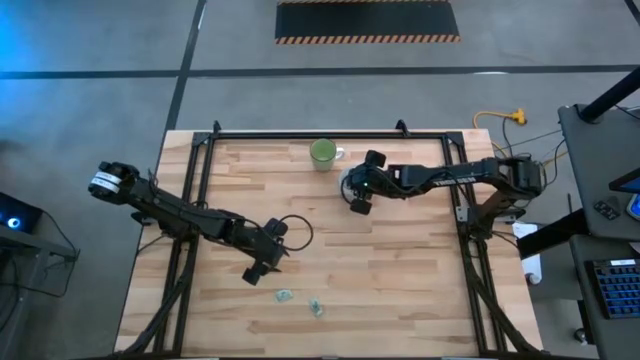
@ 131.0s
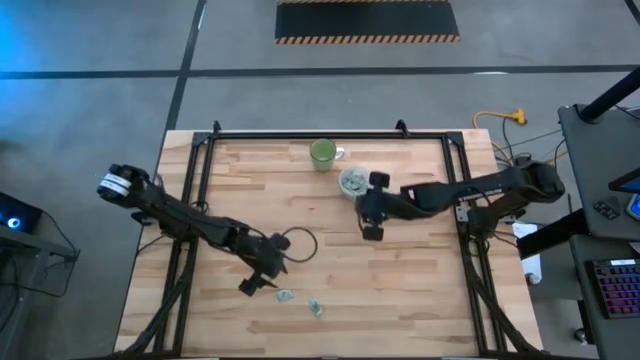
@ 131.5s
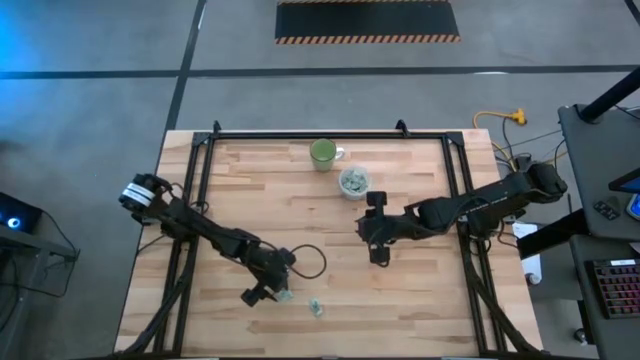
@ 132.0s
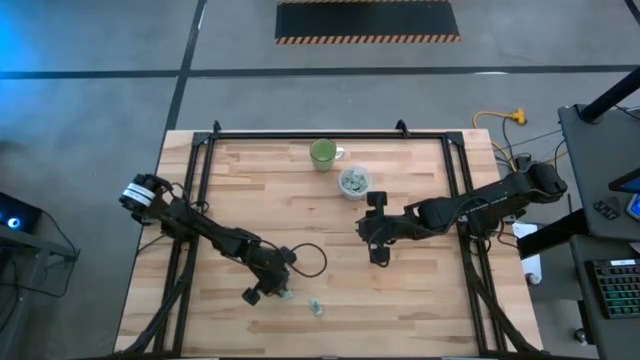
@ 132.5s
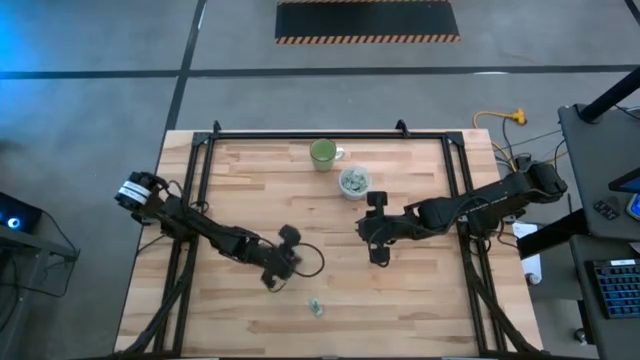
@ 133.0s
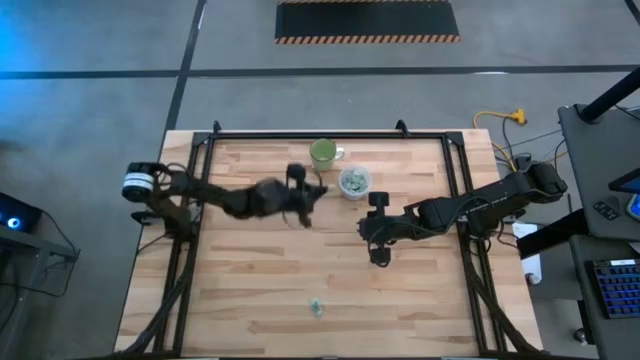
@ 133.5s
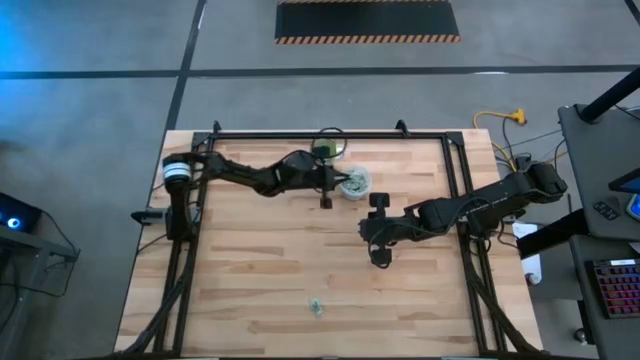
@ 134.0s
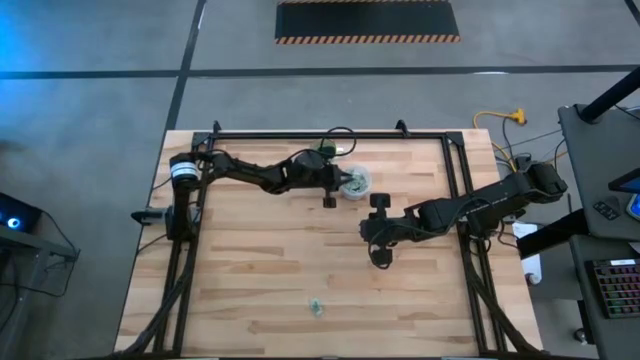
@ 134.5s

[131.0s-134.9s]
Task: Pick and place Stevia / Truvia into bins
Put the stevia packet into the transparent container

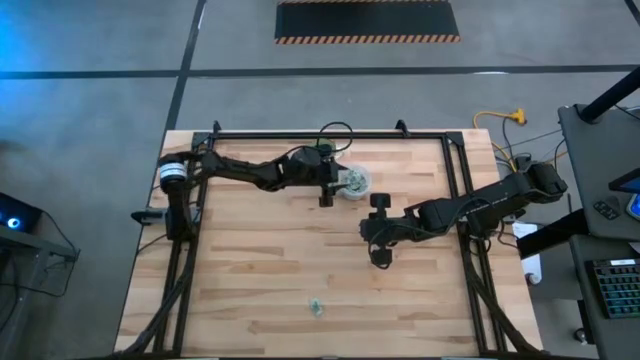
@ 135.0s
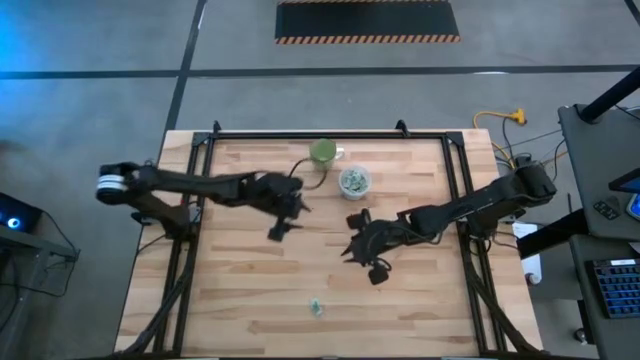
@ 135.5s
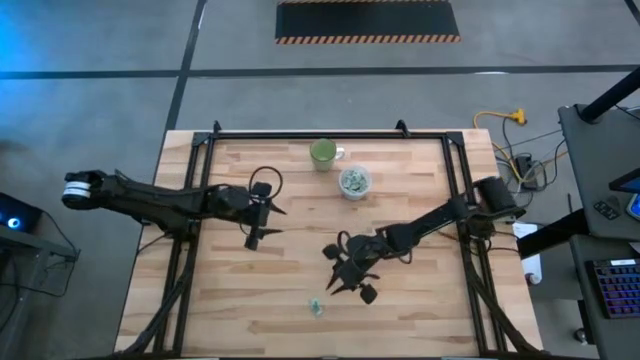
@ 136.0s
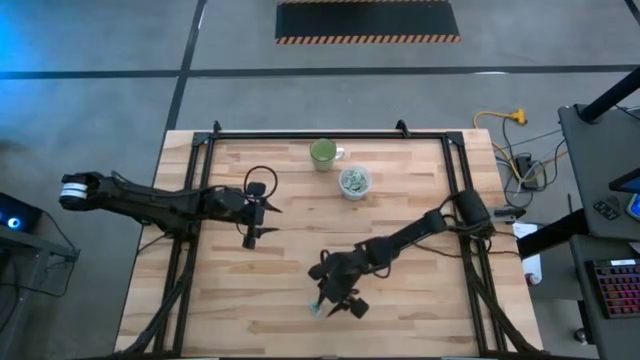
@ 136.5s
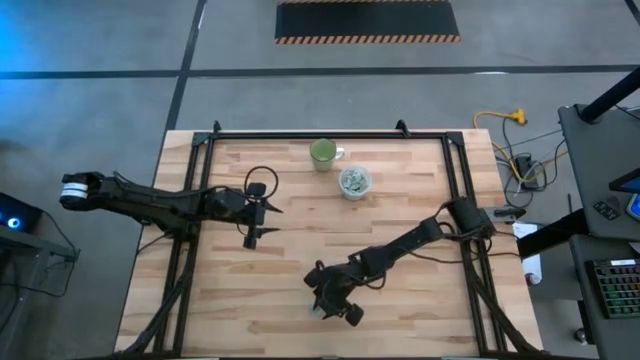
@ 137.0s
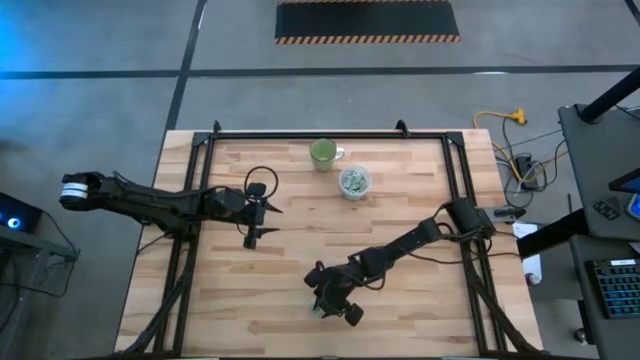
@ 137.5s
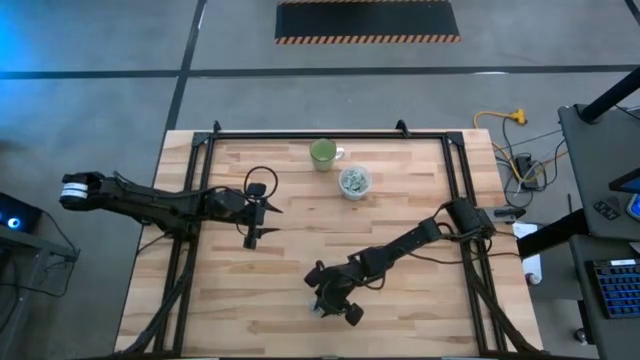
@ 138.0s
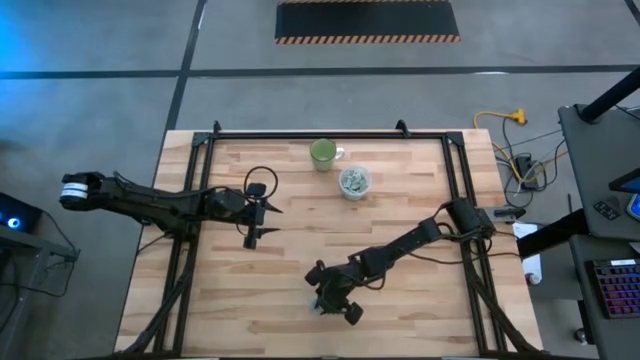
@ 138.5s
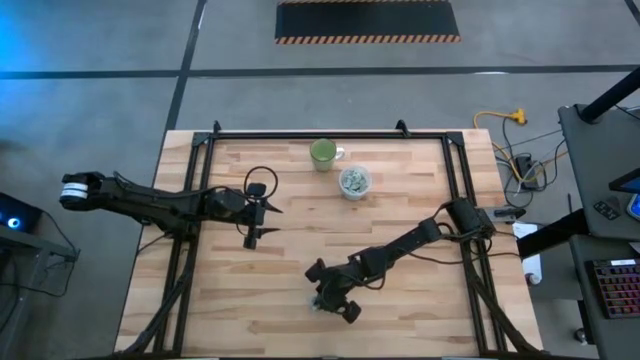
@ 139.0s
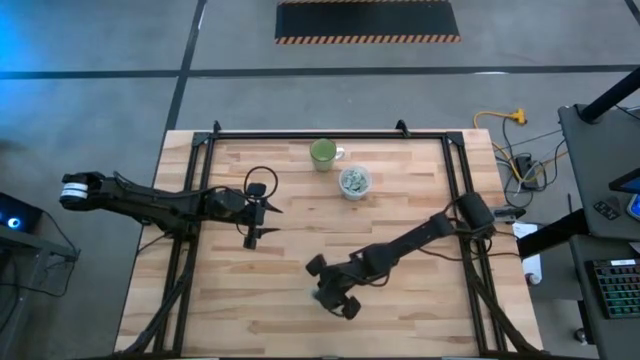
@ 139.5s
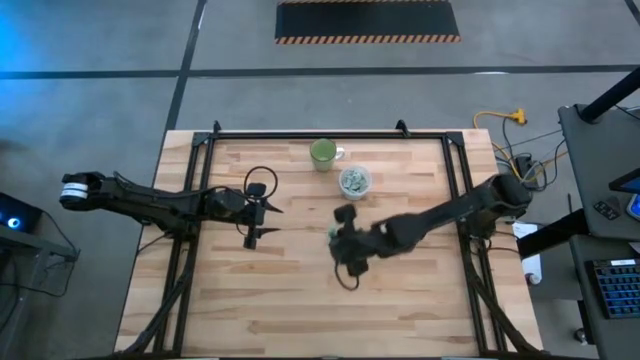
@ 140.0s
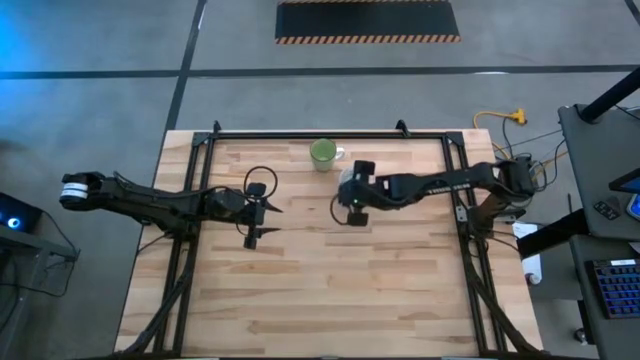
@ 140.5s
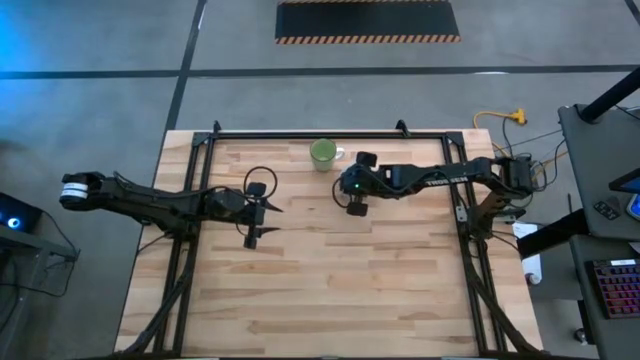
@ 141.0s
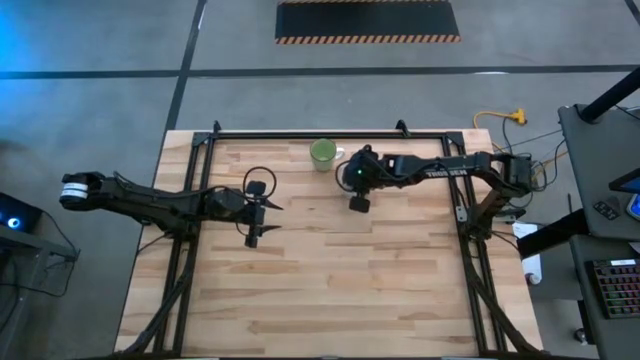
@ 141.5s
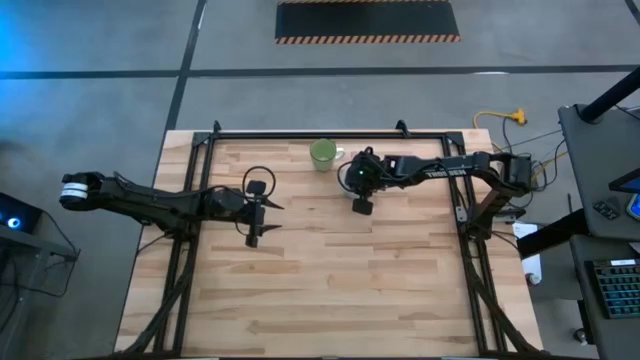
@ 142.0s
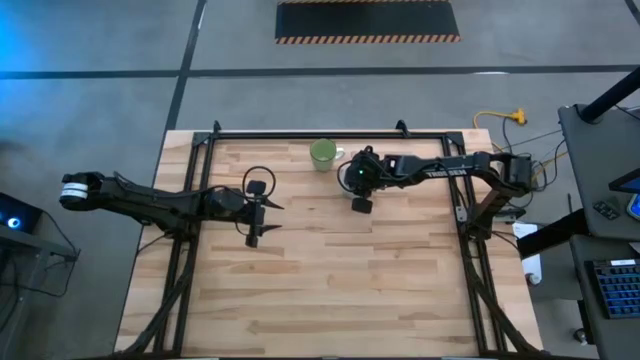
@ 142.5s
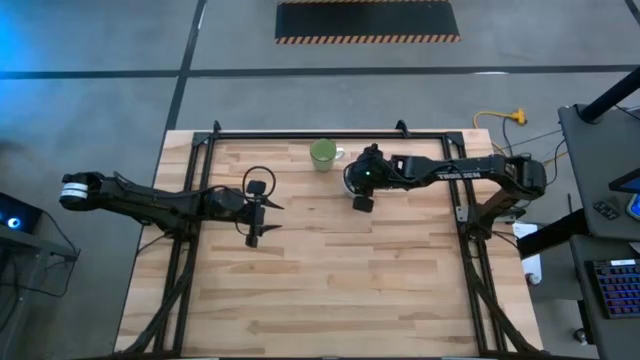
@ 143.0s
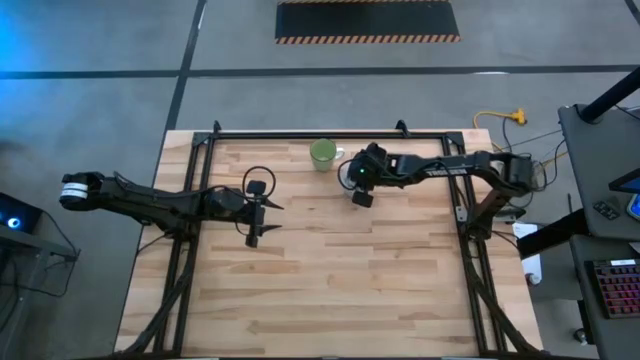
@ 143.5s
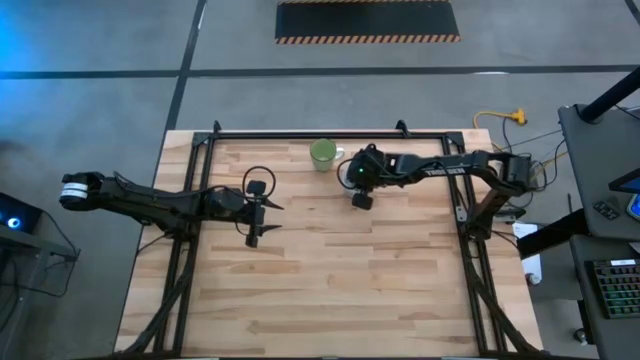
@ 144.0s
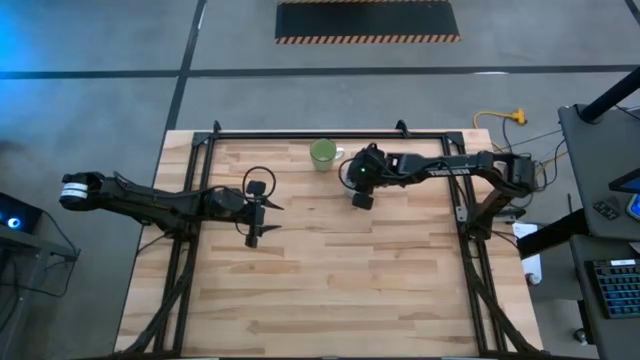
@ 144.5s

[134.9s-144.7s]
Put the stevia packet into the transparent container

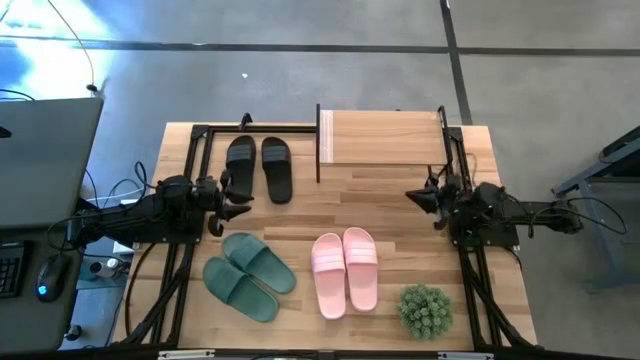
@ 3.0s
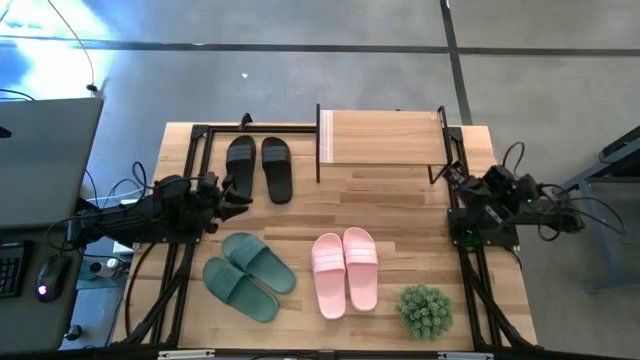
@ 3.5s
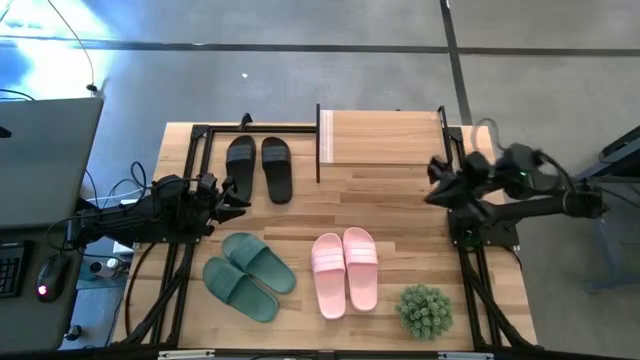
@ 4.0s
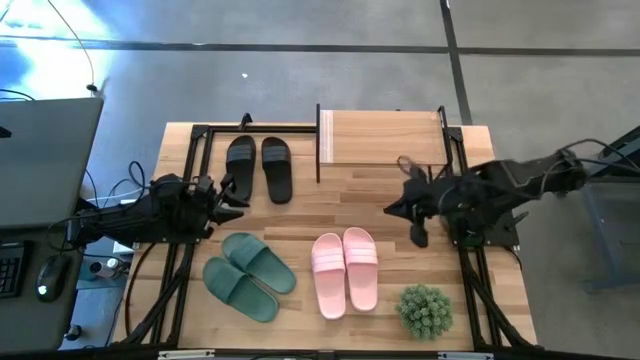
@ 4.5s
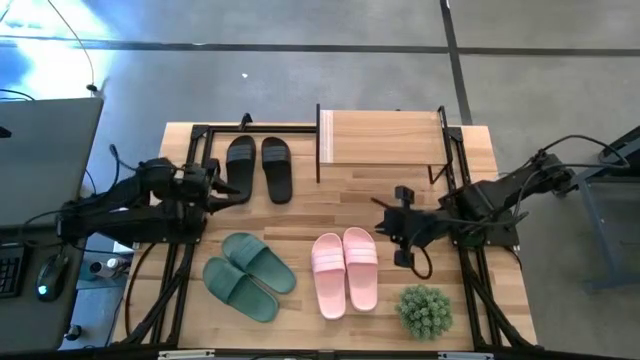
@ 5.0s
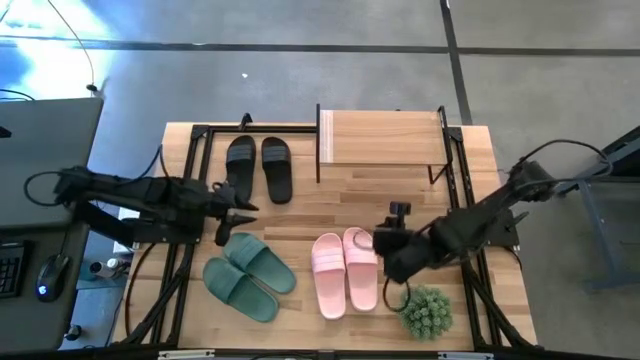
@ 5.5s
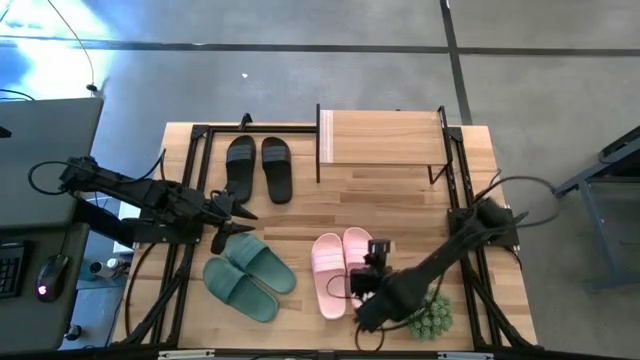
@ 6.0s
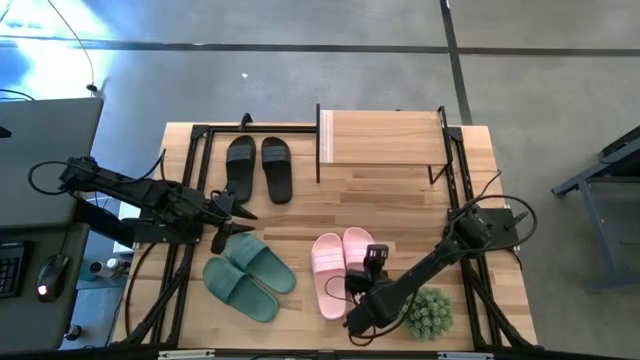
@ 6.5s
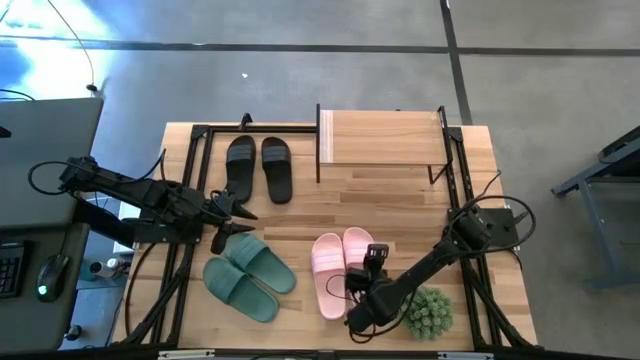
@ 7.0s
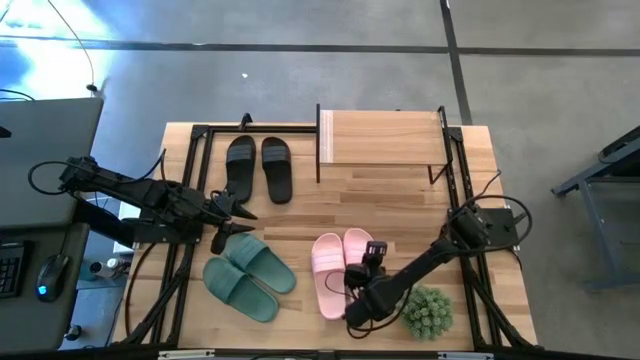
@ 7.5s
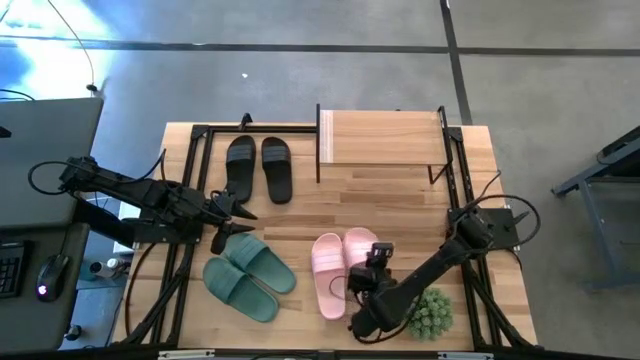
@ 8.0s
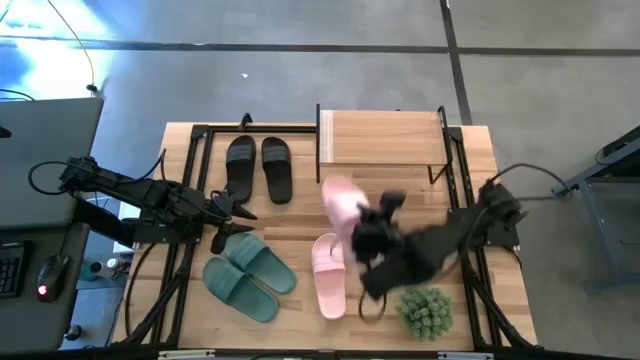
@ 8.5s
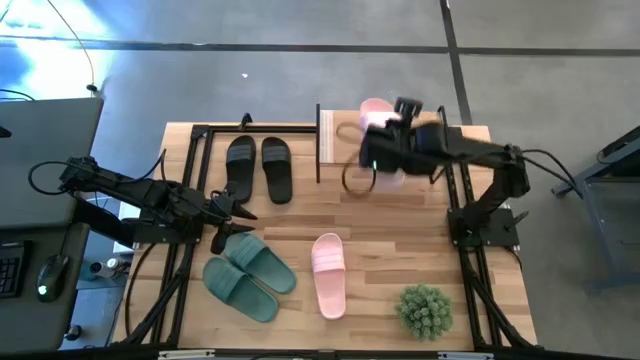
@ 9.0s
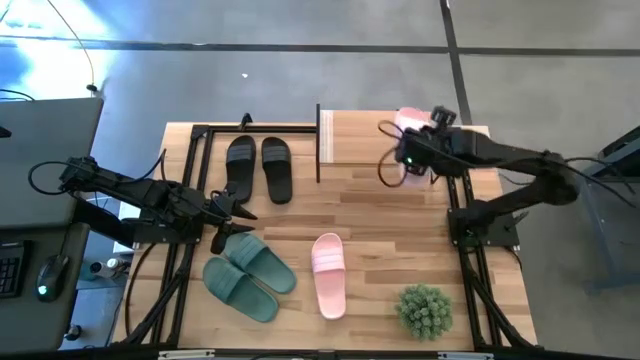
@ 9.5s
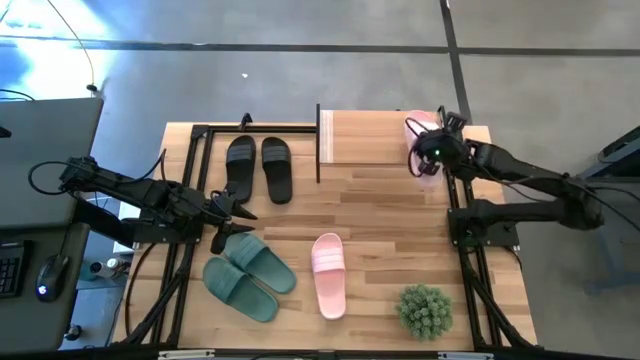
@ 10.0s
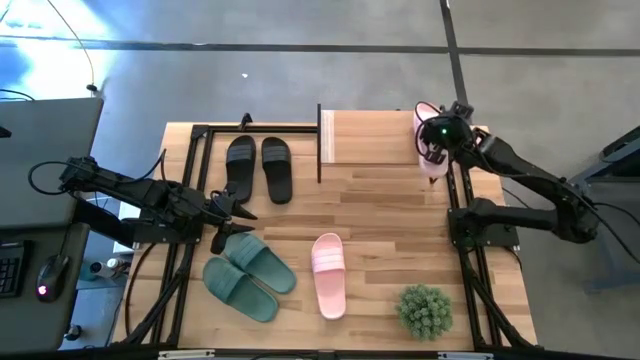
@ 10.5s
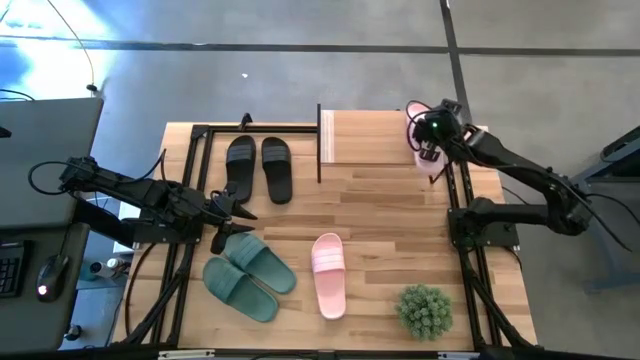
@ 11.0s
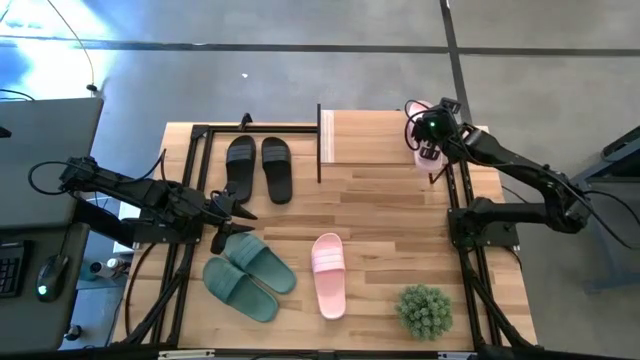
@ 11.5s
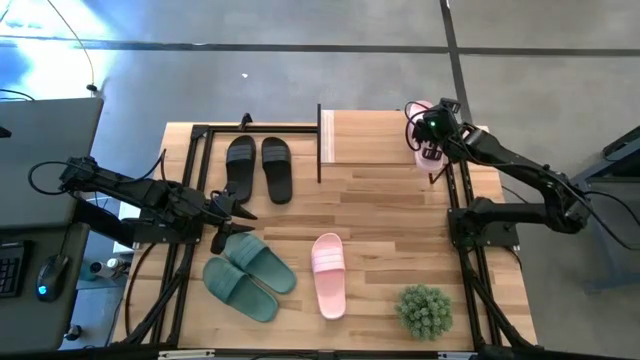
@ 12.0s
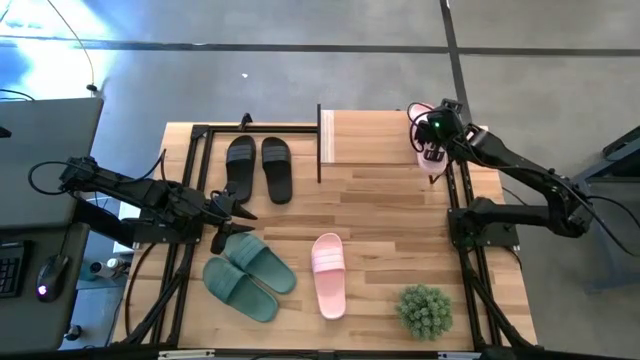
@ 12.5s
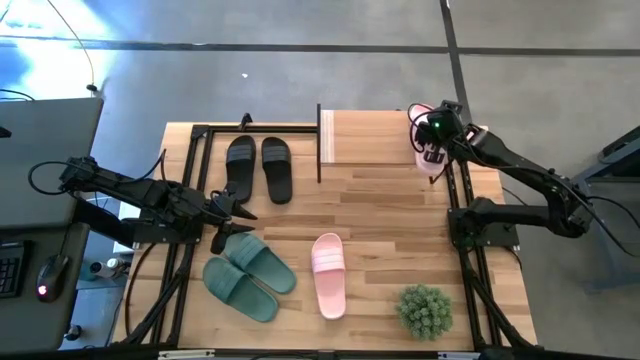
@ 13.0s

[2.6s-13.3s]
Task: Pick and place slides into the shelf
Put the right pink slipper on the shelf
